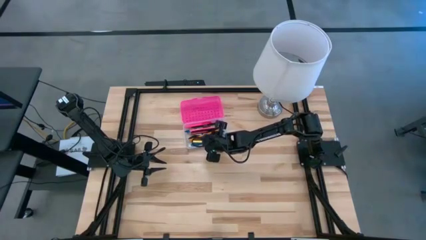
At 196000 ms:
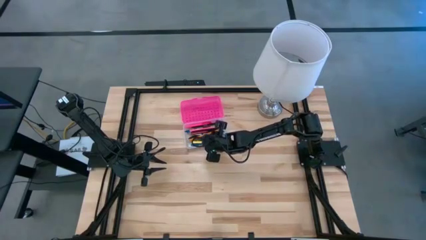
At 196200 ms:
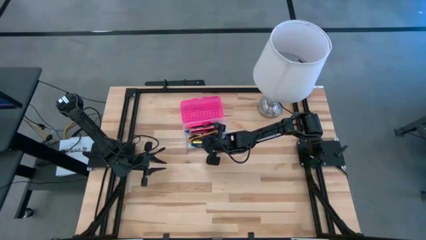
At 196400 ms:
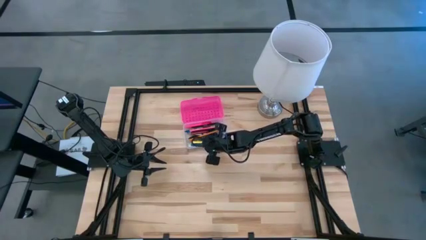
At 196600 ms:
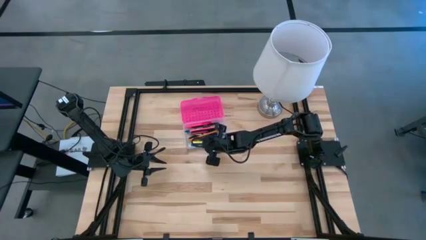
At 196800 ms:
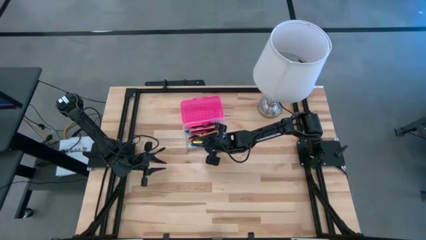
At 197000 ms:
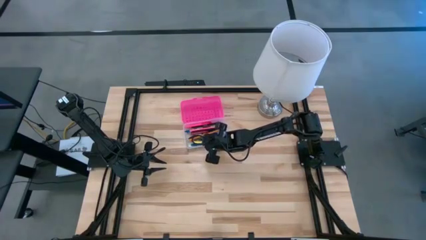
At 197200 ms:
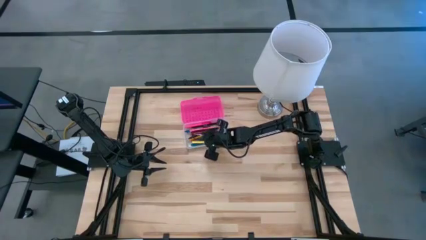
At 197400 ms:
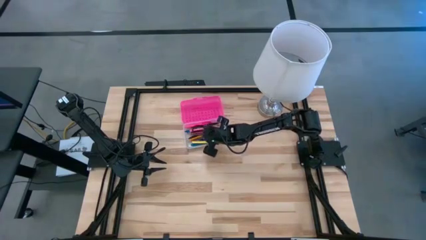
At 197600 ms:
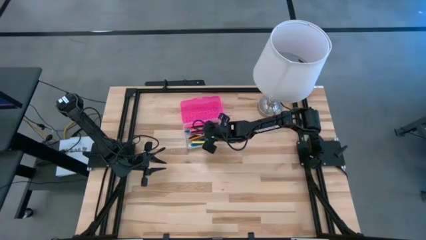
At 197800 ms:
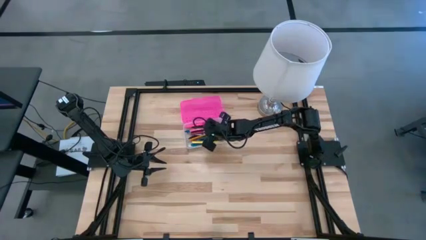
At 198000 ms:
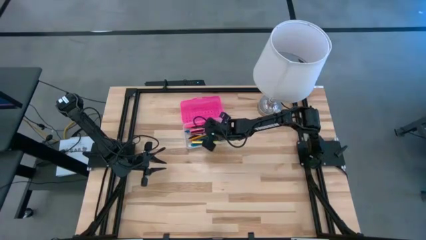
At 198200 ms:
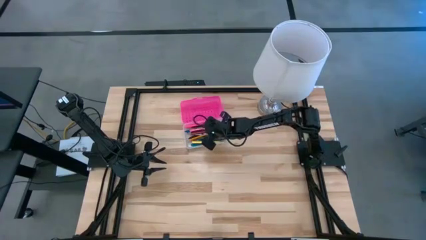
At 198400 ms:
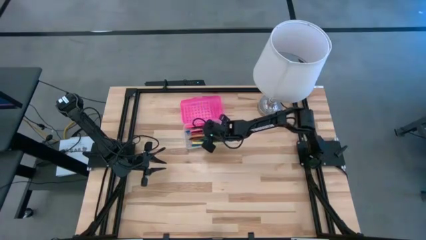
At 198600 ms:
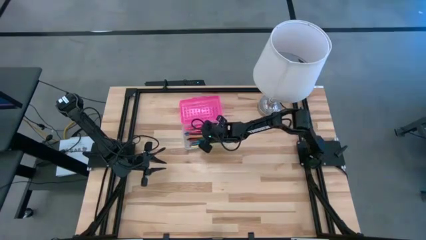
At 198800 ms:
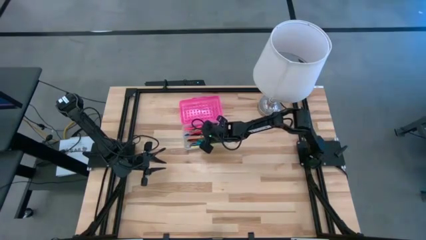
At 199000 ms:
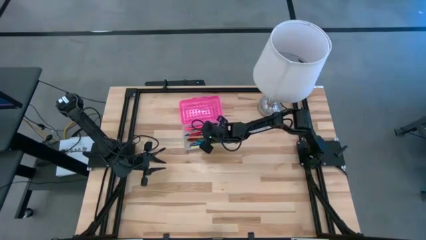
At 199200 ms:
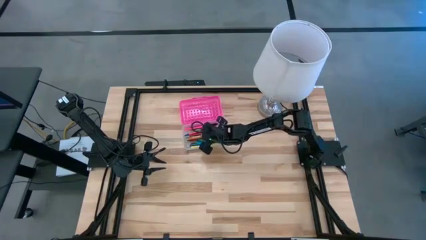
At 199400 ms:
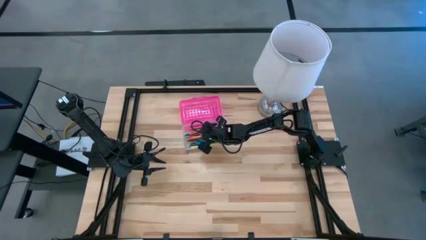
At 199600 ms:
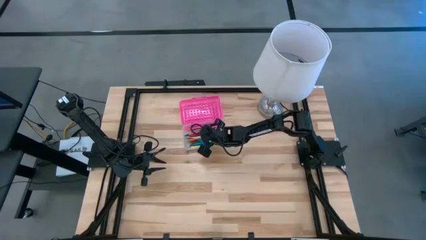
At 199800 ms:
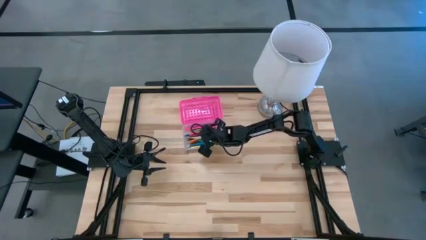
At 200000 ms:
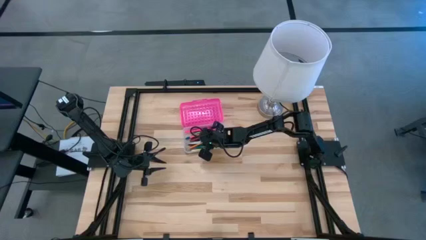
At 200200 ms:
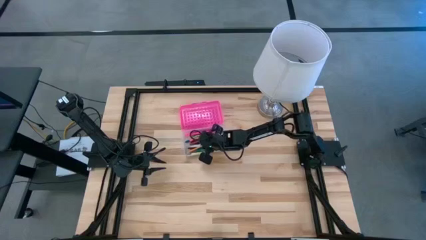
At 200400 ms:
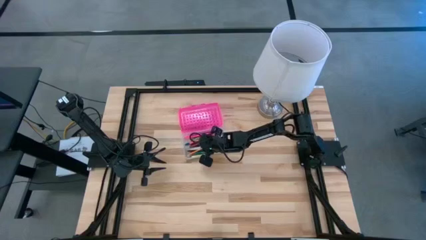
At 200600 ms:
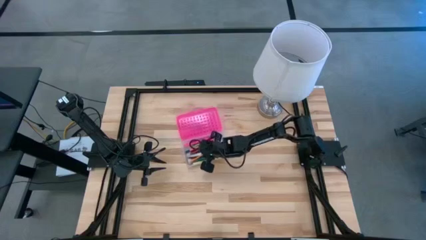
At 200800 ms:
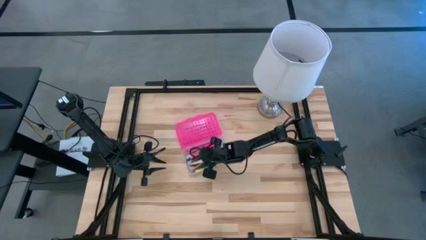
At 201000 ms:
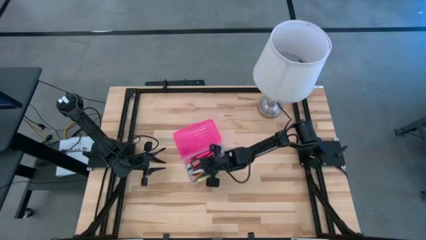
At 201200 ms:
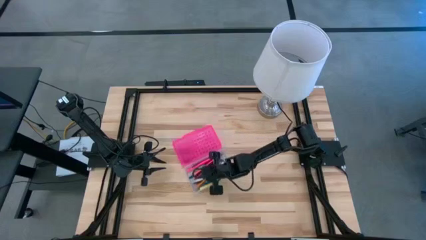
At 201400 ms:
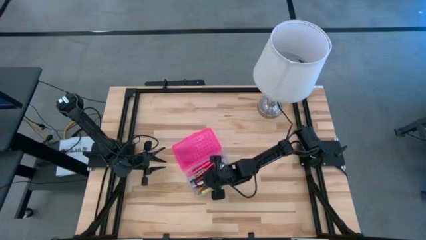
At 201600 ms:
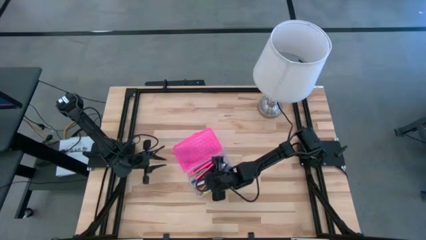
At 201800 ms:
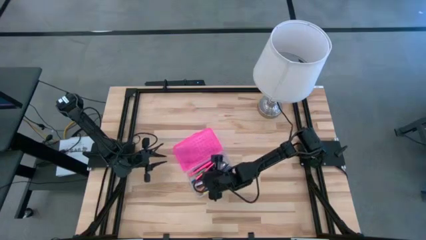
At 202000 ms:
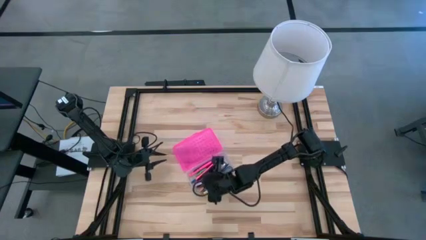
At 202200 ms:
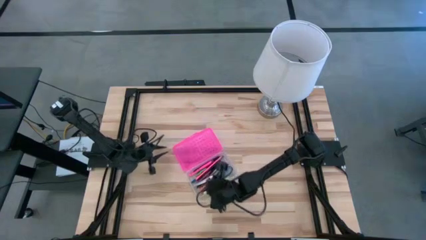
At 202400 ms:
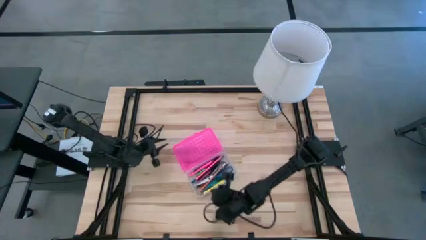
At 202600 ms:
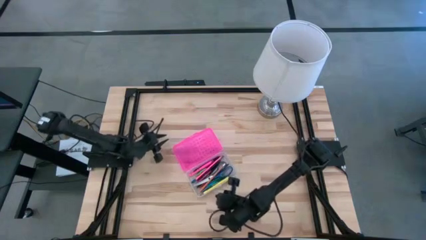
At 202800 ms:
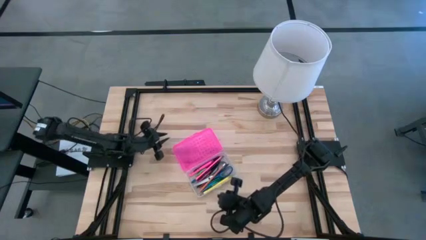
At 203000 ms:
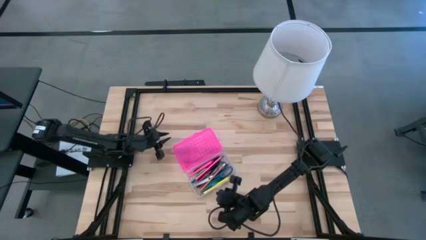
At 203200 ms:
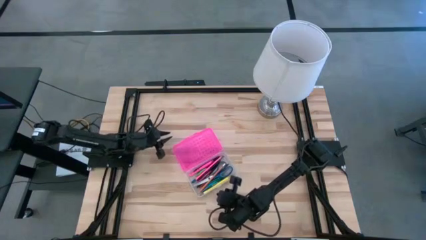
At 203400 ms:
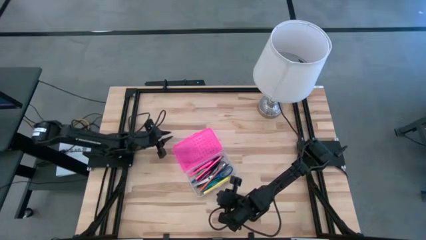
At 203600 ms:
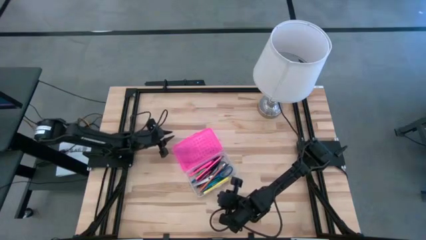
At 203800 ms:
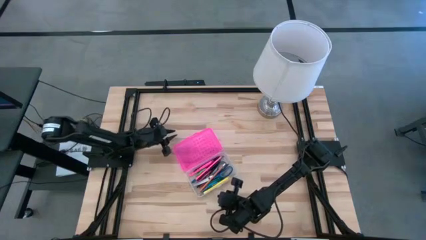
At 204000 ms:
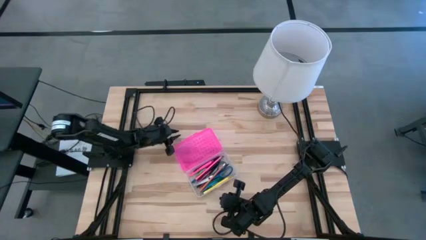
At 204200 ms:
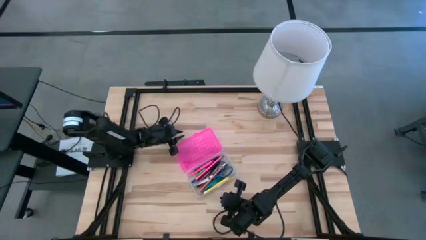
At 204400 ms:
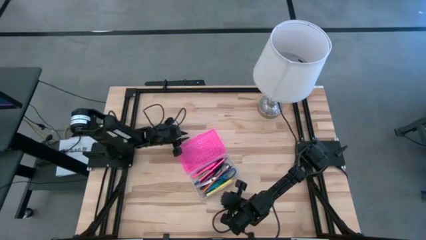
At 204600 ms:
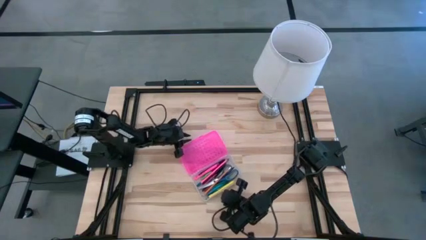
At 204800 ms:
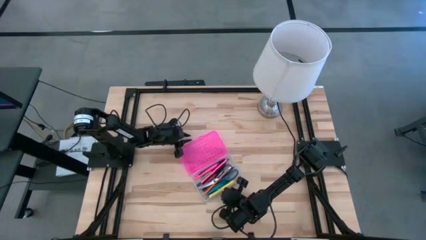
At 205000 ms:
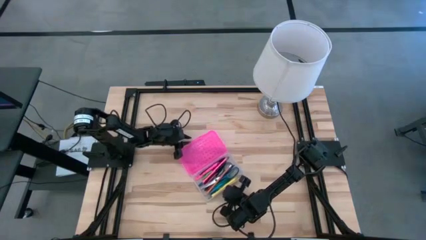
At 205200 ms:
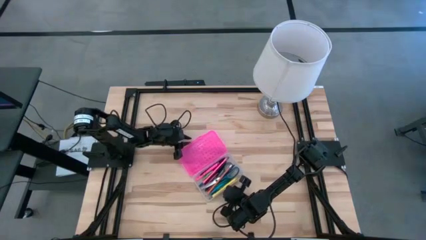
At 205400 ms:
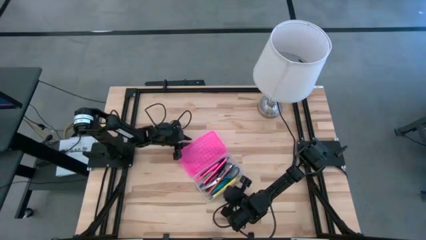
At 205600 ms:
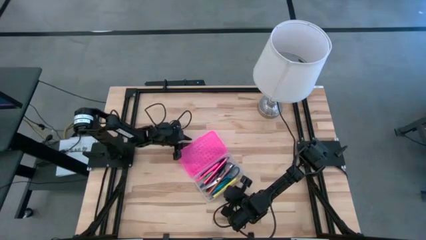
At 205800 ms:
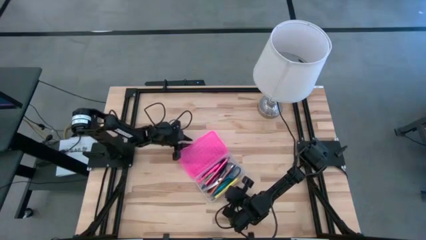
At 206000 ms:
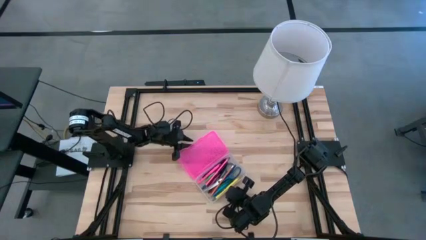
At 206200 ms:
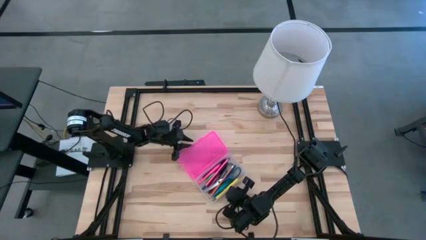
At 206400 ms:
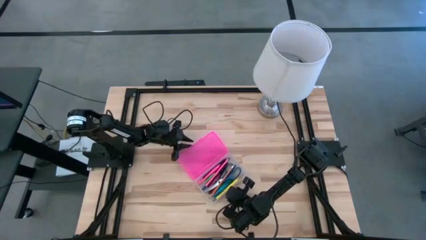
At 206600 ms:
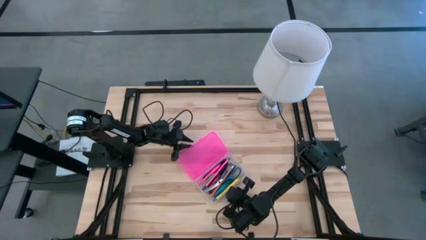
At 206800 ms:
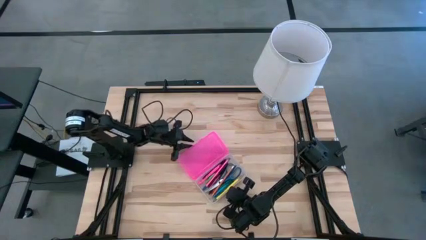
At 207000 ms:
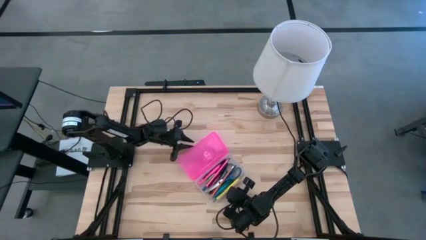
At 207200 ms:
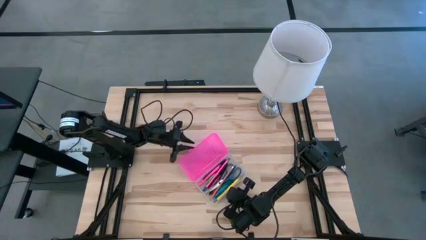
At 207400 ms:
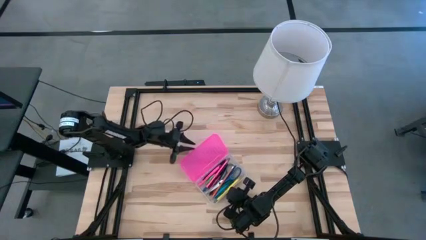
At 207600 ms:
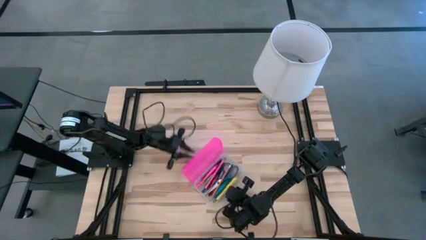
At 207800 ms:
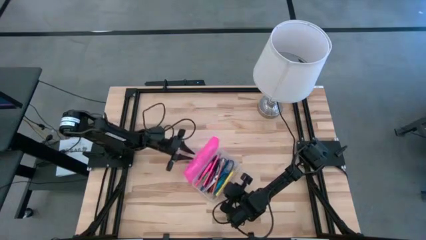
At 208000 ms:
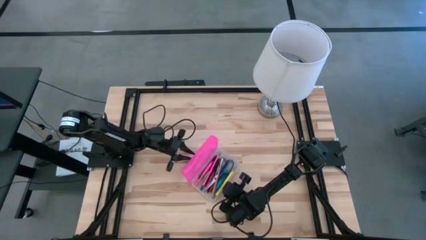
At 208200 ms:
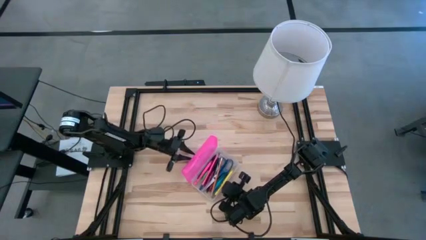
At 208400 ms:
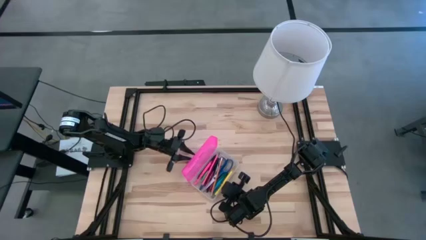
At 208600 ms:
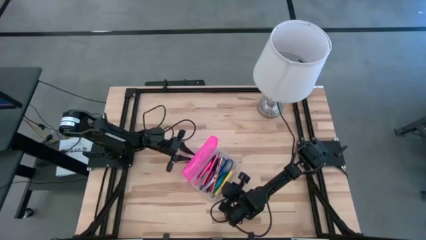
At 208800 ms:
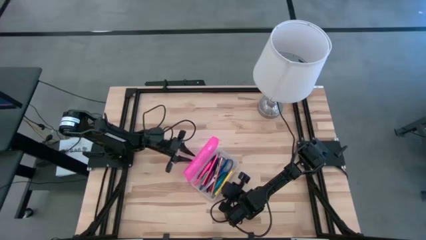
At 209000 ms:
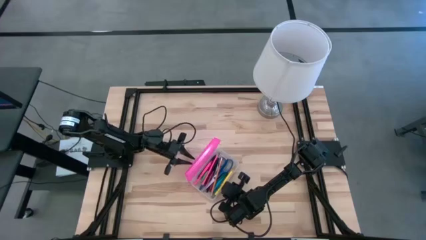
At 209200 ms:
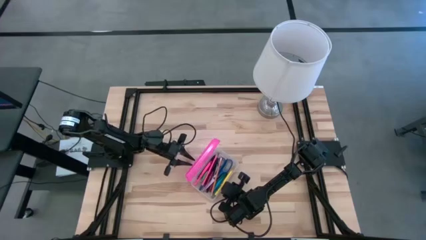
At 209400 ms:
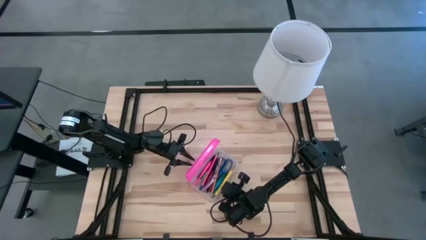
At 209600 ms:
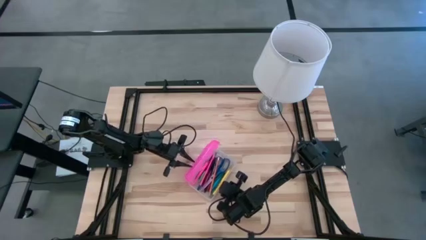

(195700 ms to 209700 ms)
Task: Pick & place school supplies into a supply box
Close the pink supply box

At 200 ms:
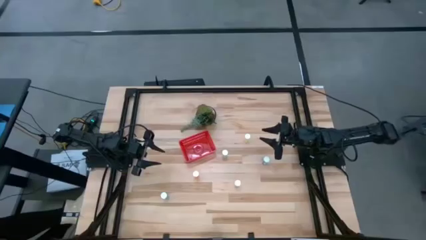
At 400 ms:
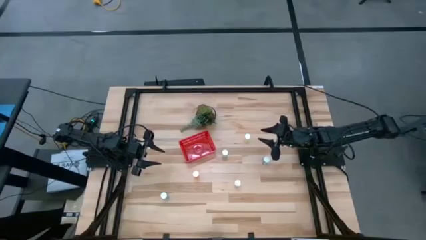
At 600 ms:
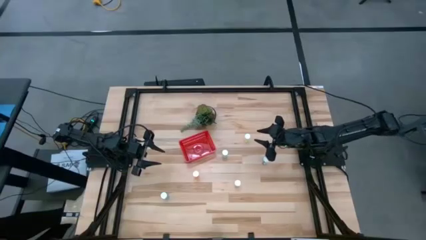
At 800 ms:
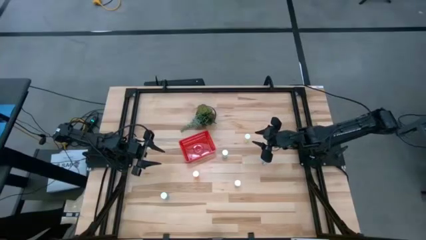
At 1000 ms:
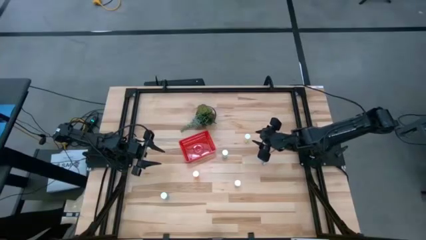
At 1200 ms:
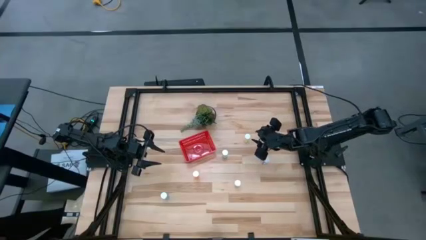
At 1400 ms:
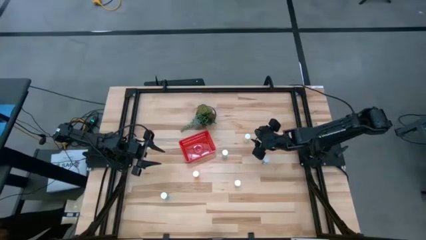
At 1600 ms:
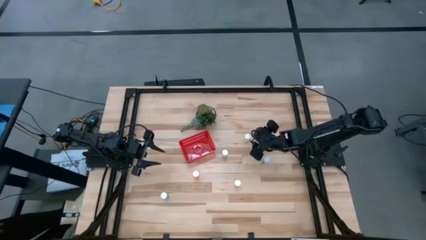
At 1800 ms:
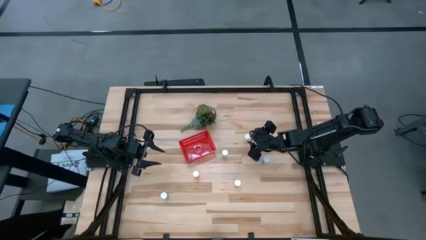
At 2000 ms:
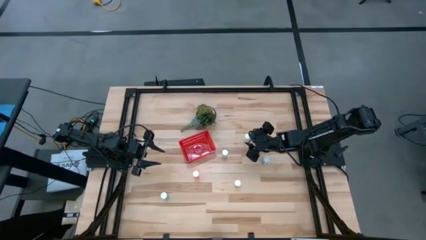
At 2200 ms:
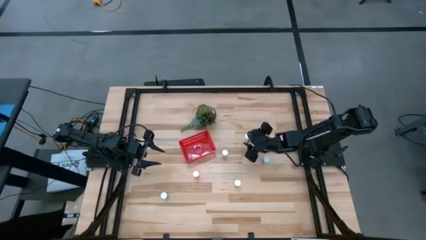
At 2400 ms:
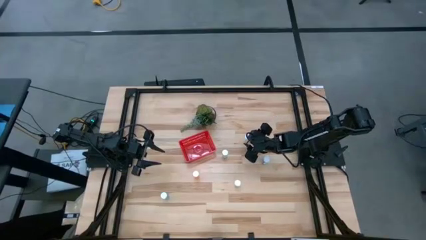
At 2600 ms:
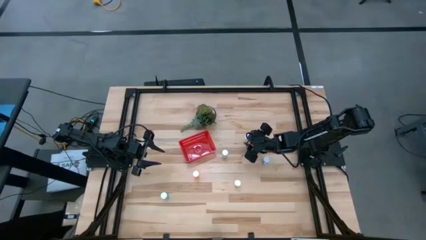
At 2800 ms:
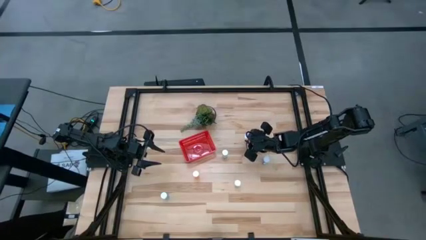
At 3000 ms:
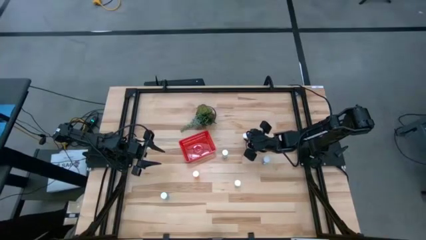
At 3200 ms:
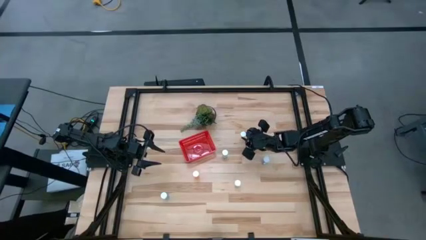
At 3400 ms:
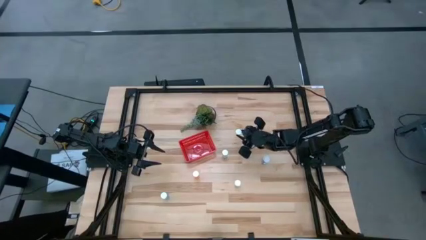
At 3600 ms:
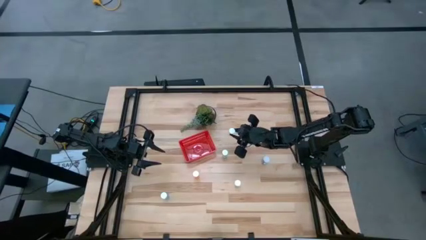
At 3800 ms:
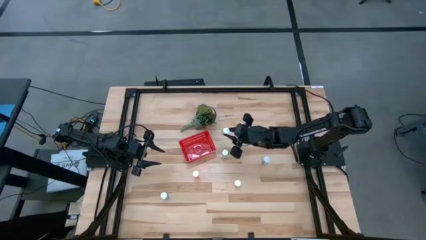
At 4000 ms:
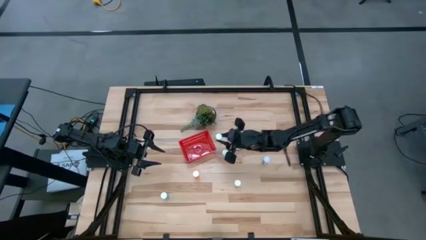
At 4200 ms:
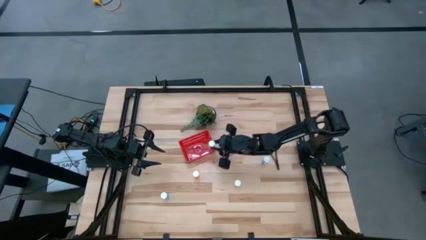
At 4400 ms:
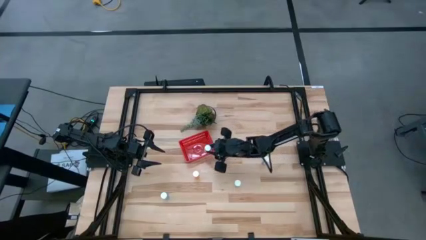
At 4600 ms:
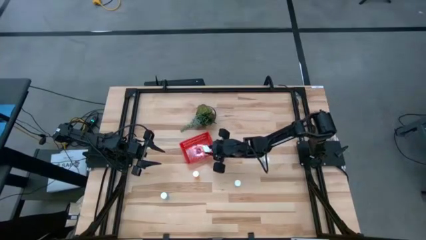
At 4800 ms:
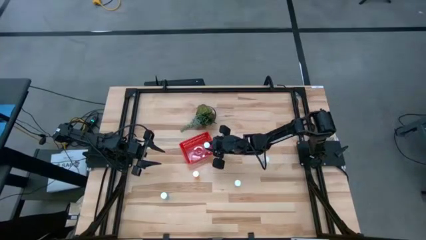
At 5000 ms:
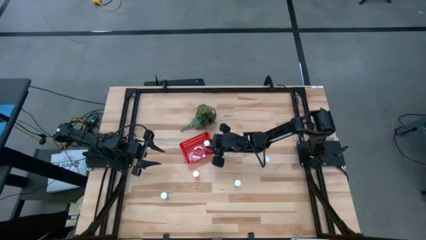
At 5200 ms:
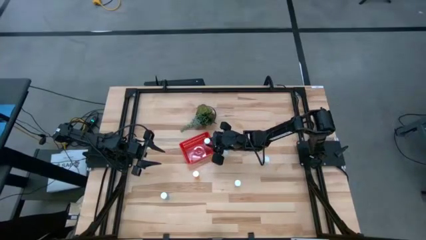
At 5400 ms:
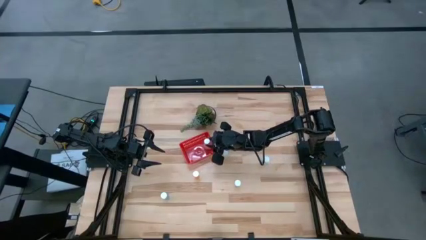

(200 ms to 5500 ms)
Task: Pick and place pill bottles into a basket
Put the top yellow pill bottle into the red bin
